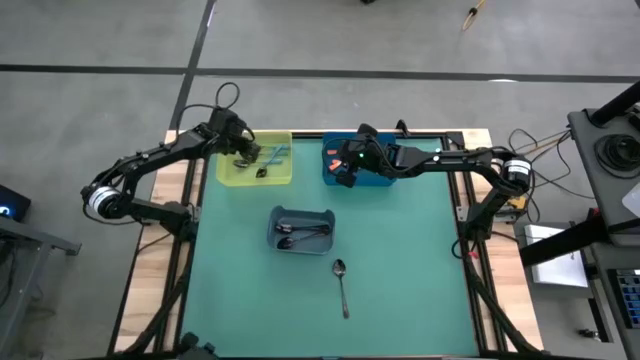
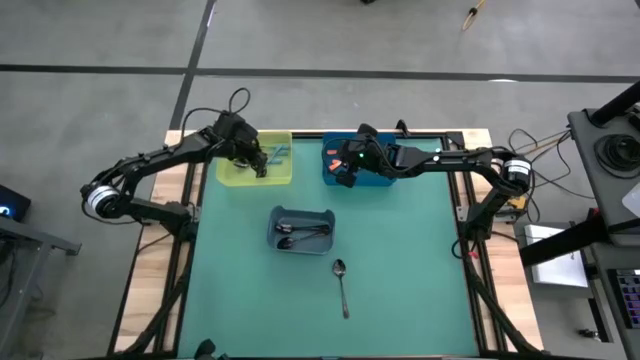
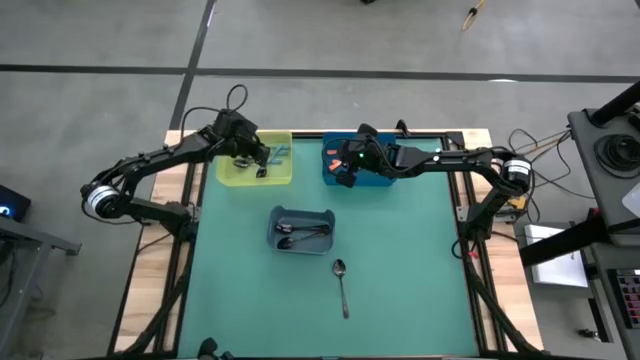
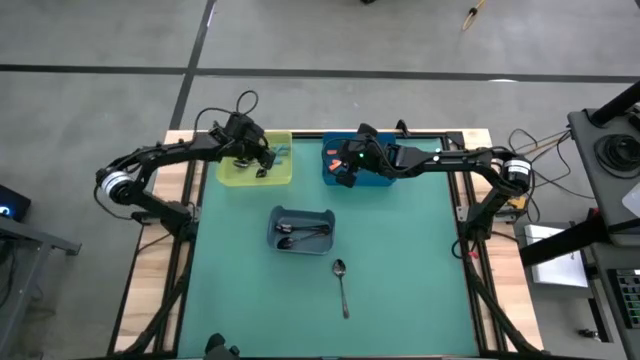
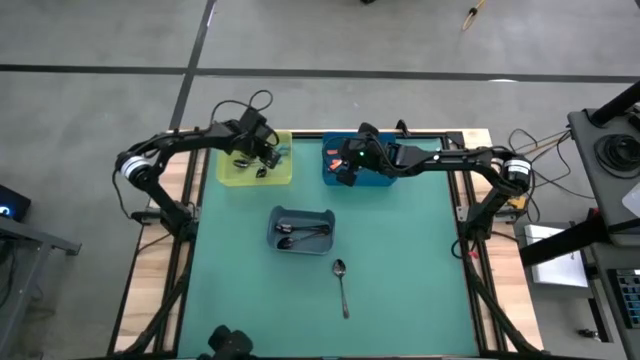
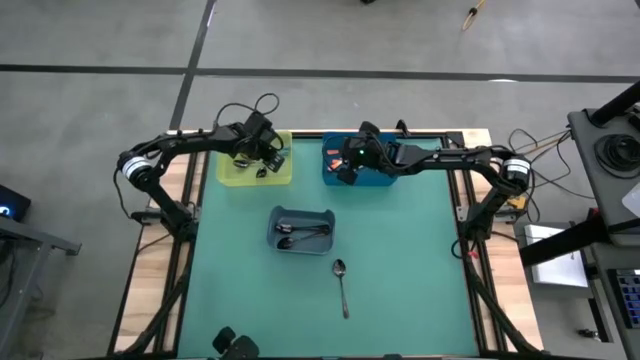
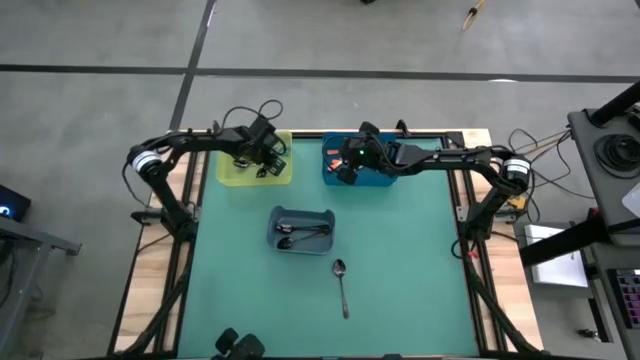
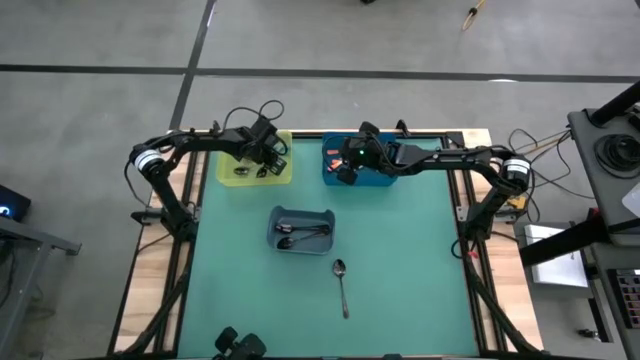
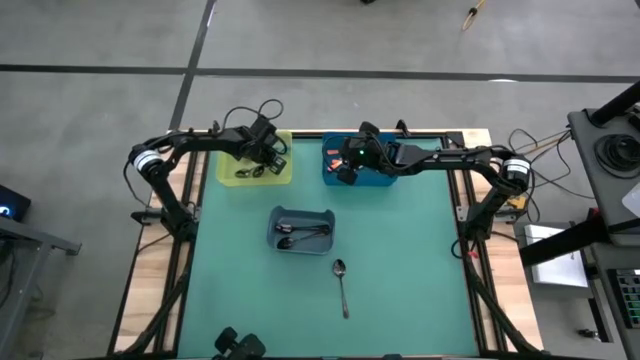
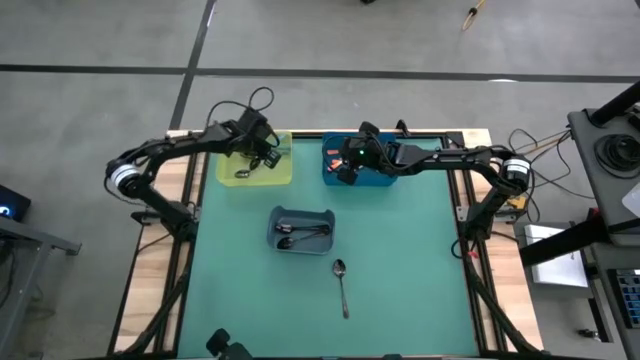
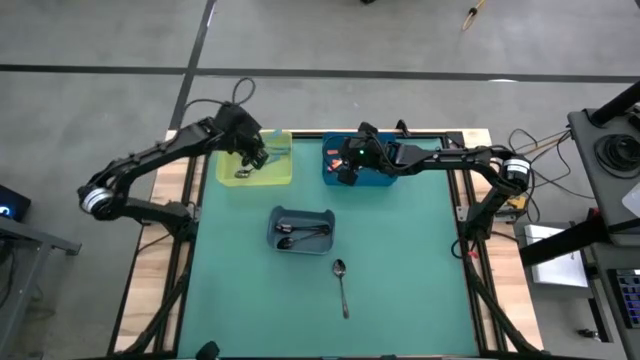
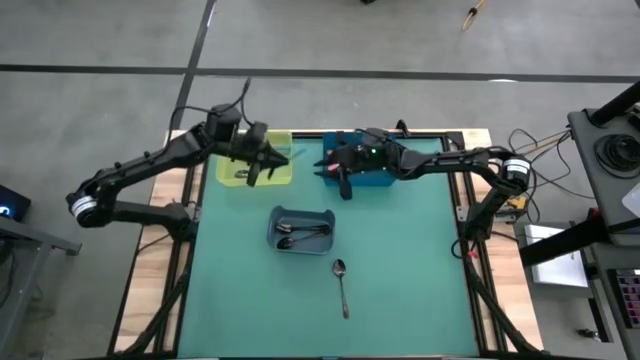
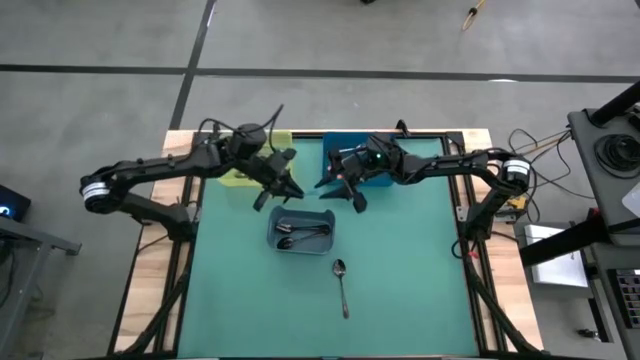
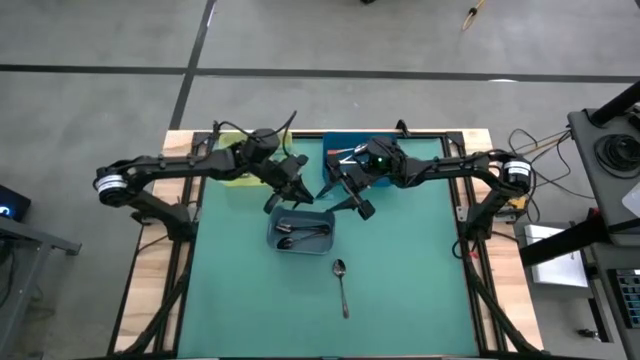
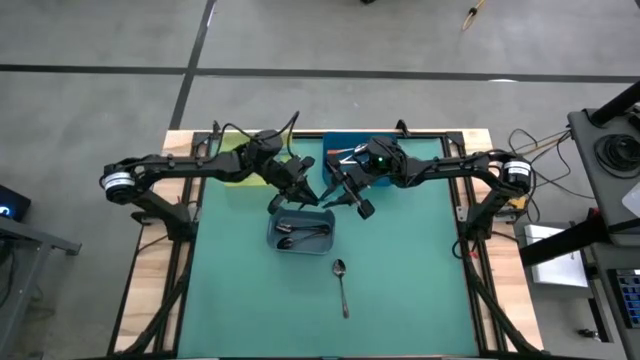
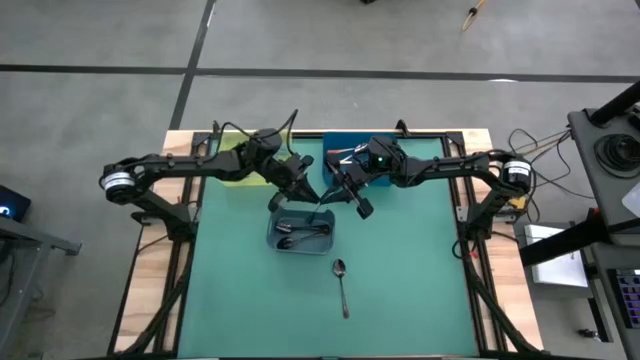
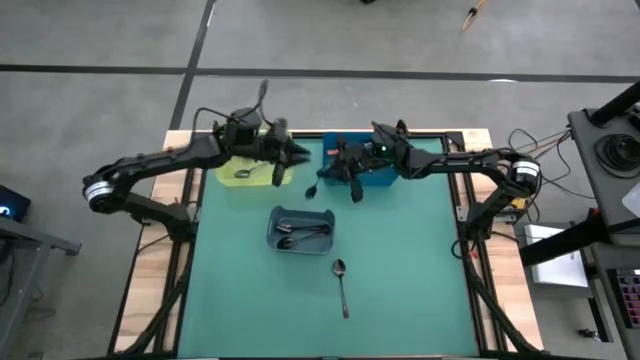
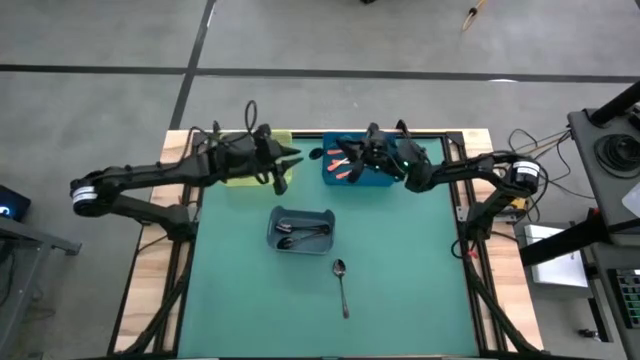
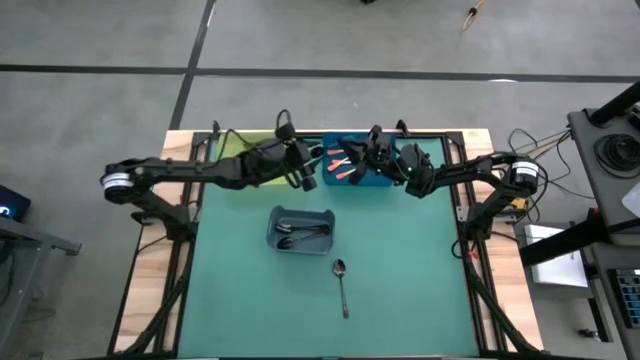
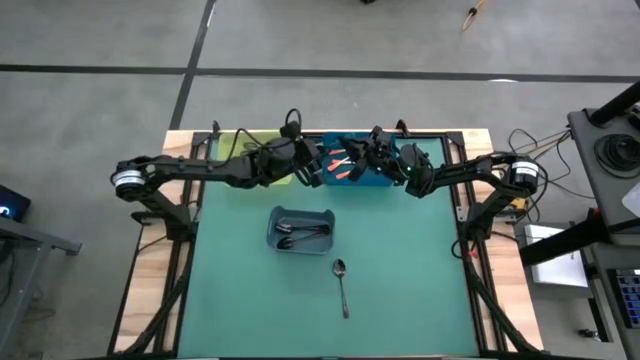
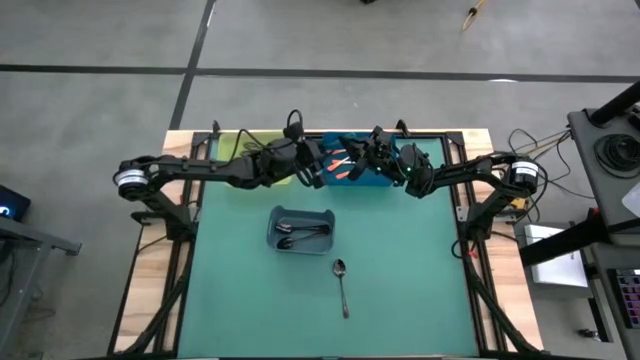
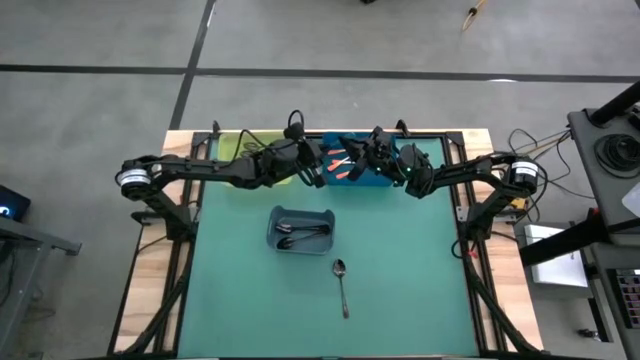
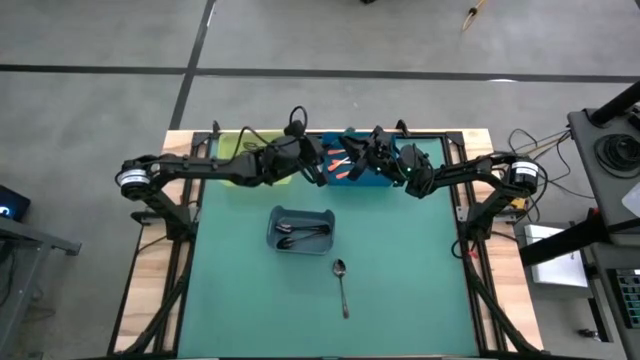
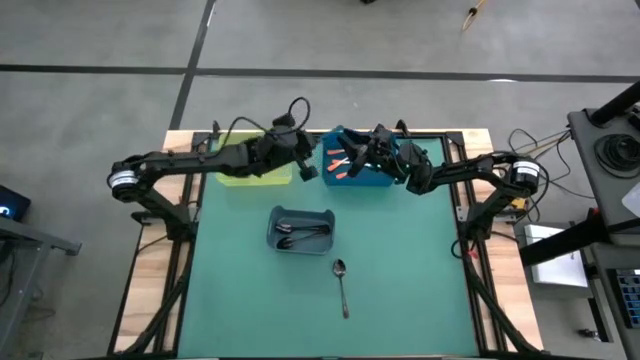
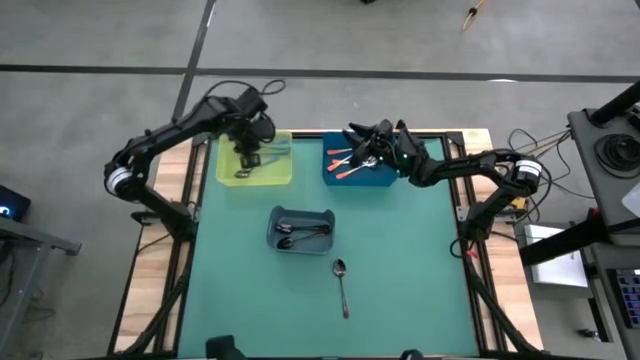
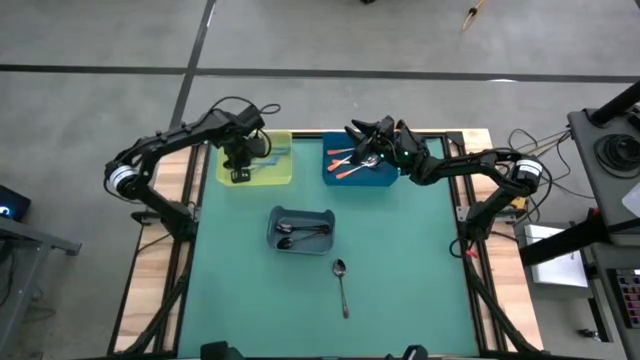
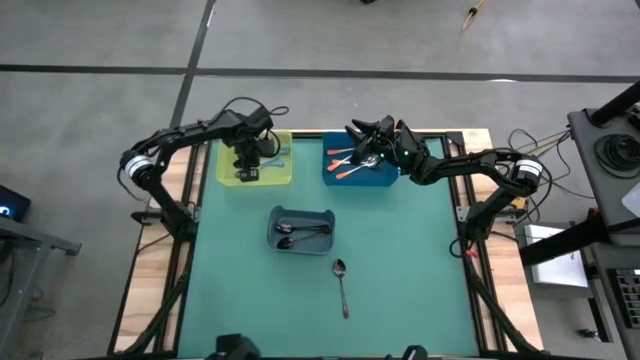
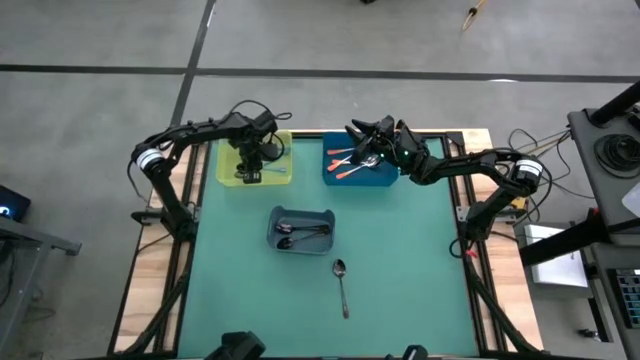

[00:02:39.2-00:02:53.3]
Task: Sort silverware by color (type)
Adjust the blue spoon in the green bin

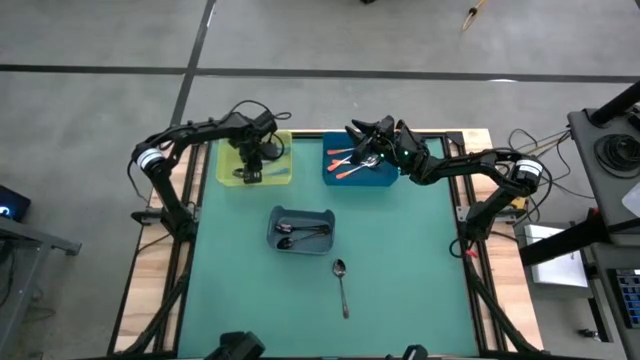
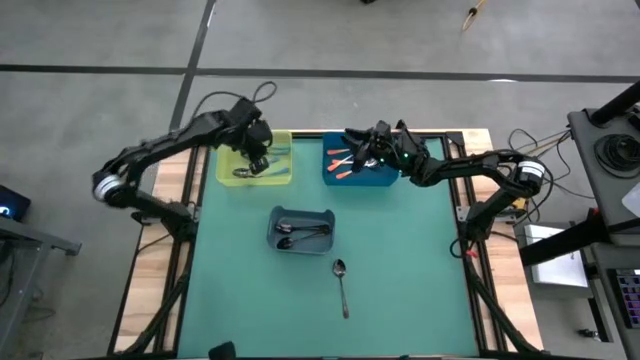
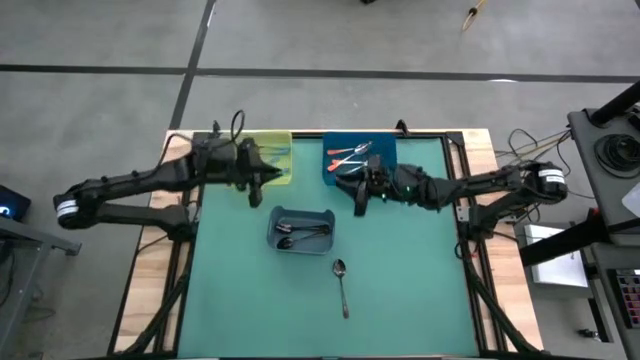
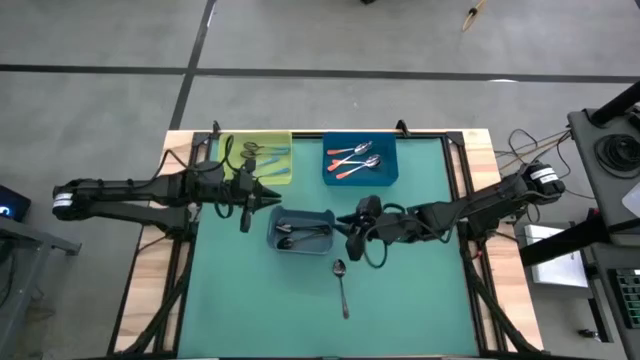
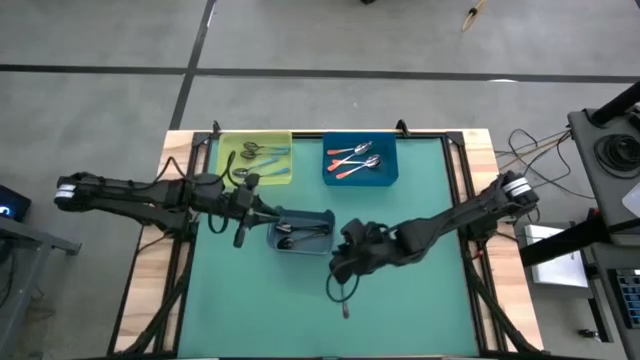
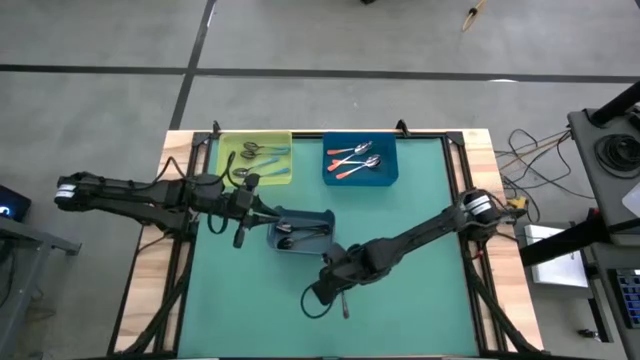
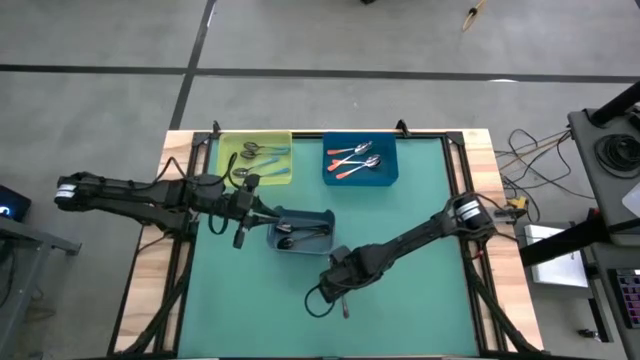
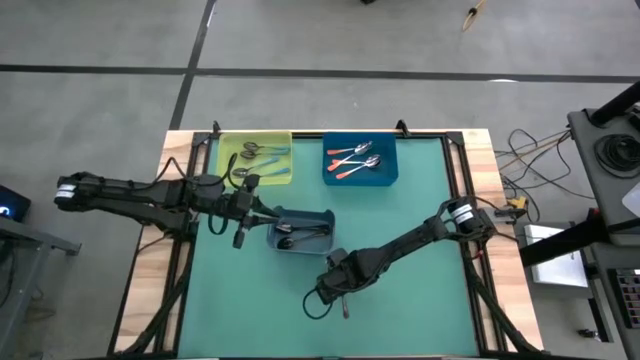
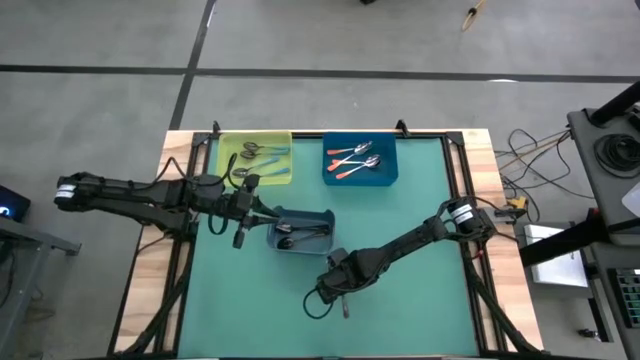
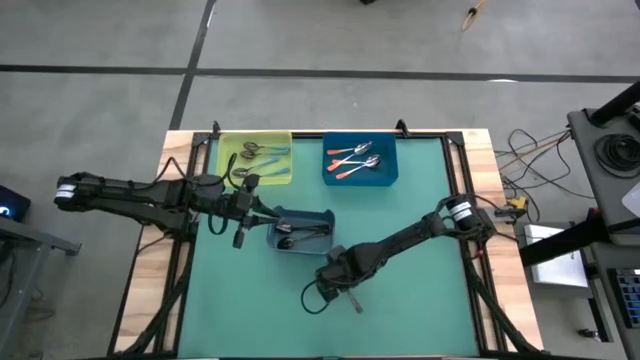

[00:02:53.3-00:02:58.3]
Put the black spoon into the gray bin

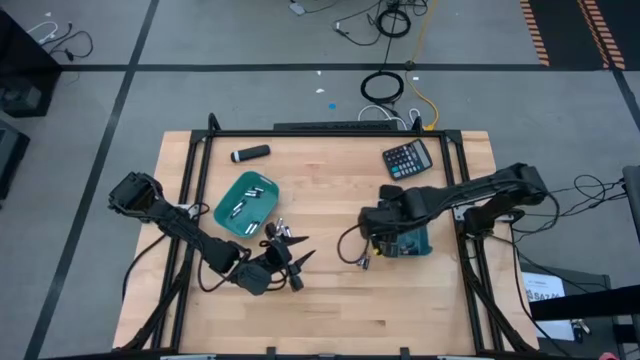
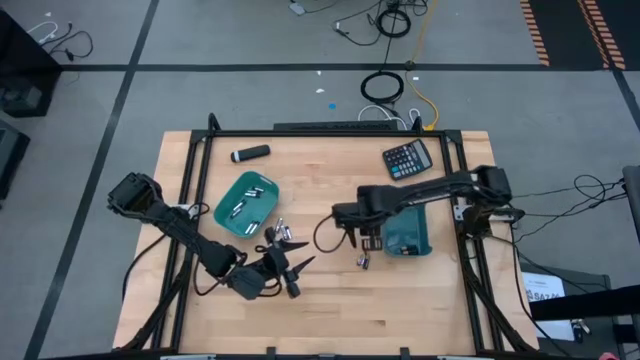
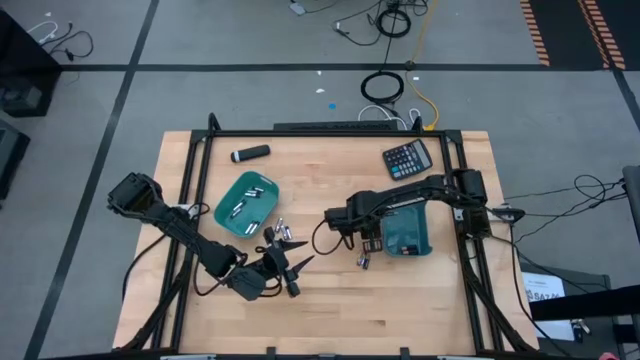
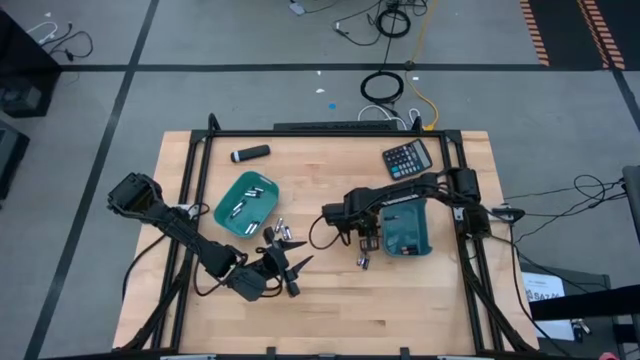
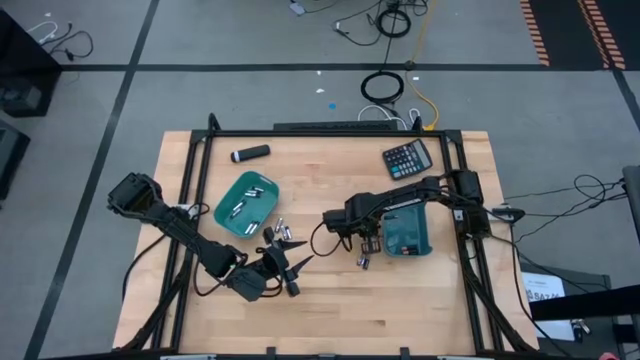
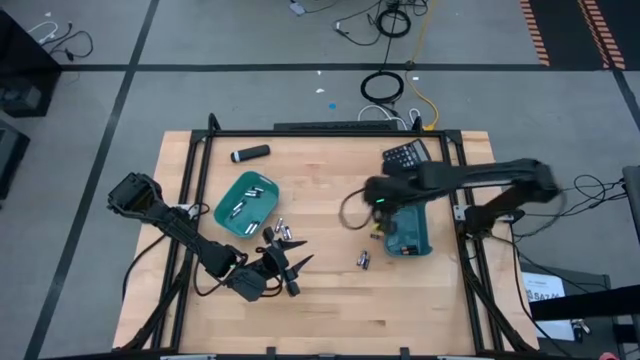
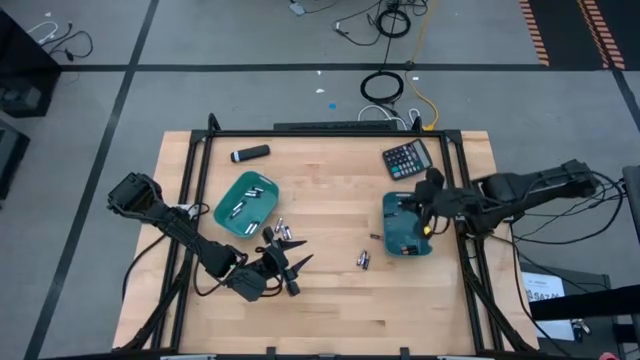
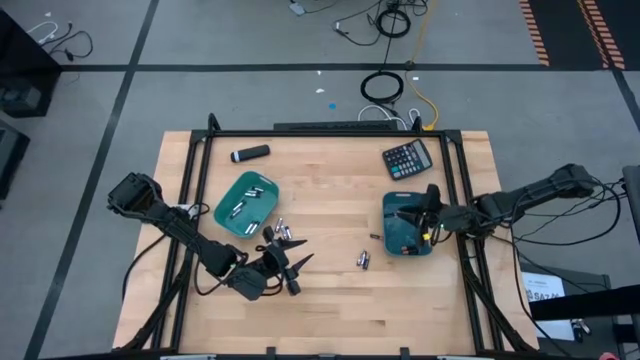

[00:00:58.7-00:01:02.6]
Task: Sort batteries
Put the black battery into the blue bin
